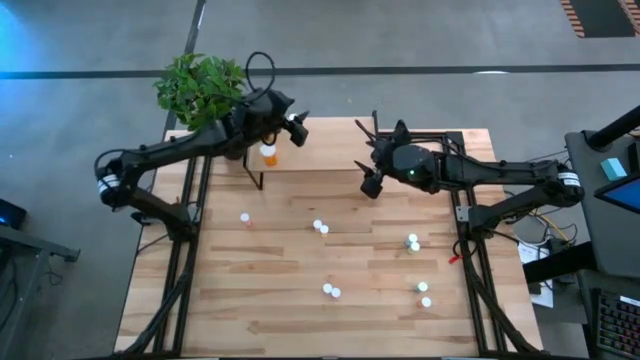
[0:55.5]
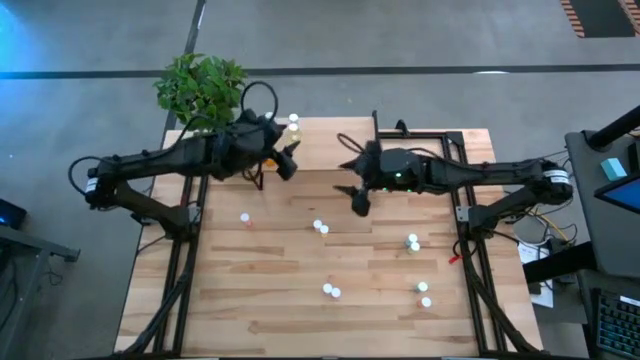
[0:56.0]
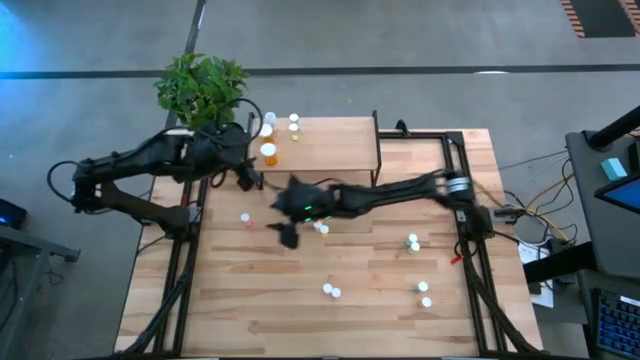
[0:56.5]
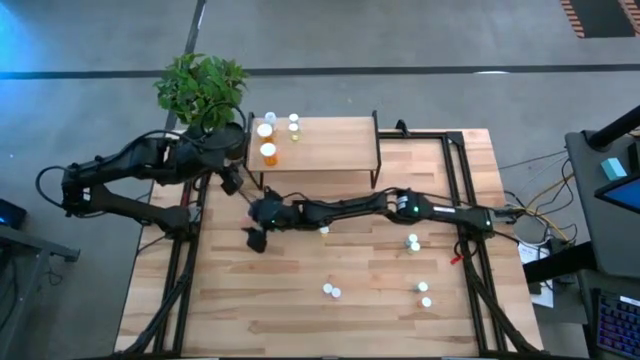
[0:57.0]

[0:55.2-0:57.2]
Task: Pick and place medicine bottles onto shelf by color
Put the pink pill bottle on the shelf

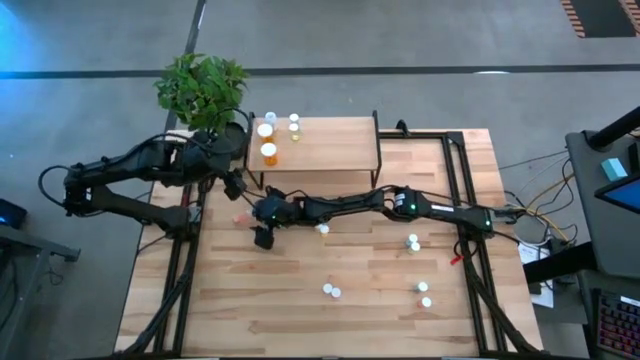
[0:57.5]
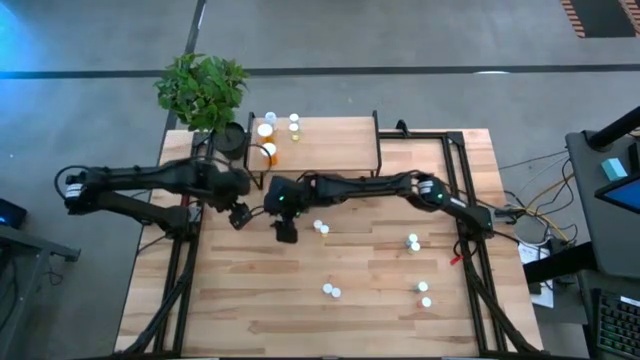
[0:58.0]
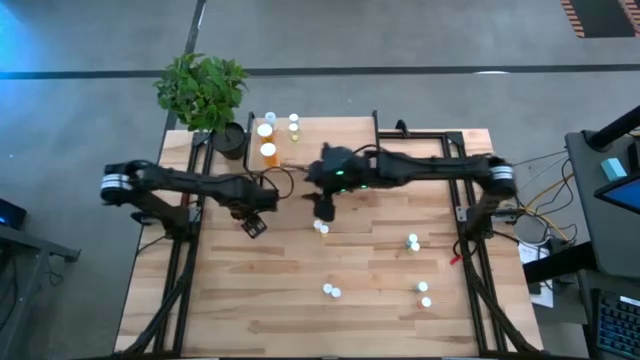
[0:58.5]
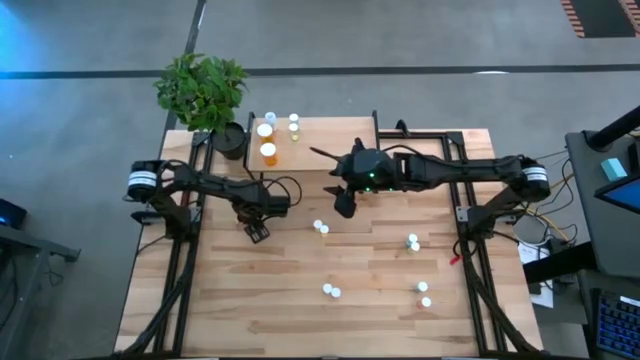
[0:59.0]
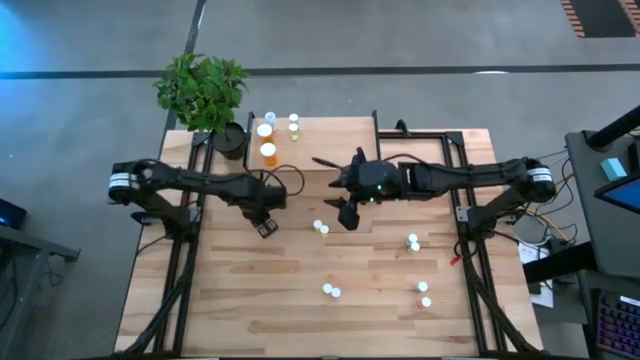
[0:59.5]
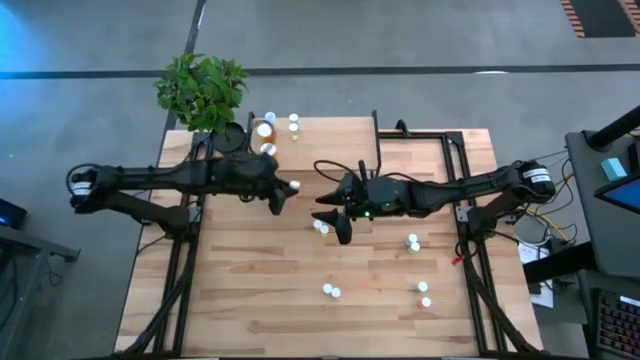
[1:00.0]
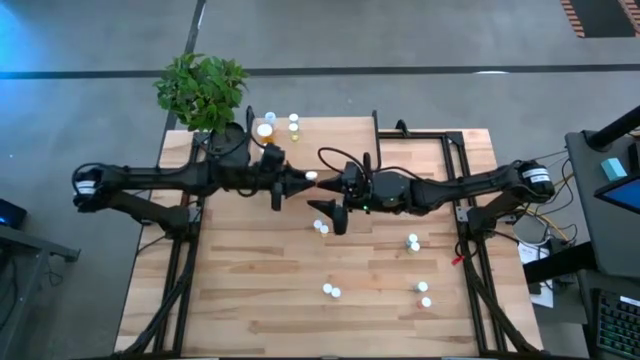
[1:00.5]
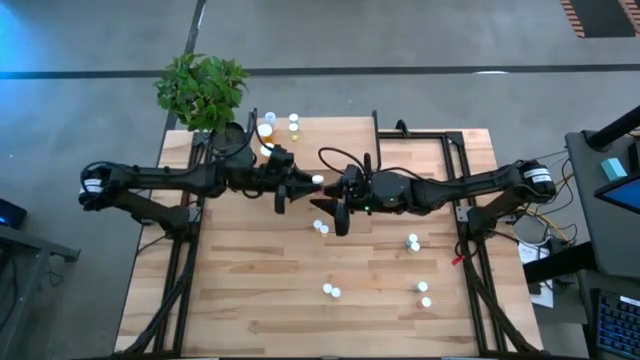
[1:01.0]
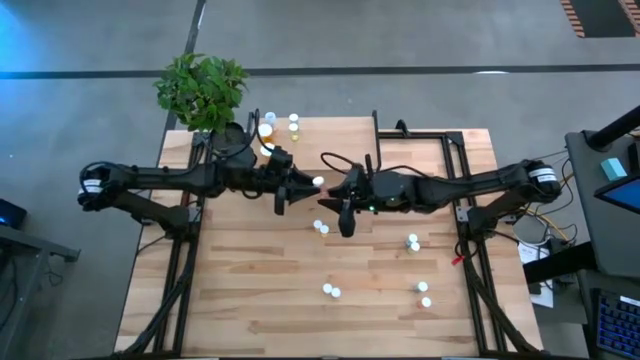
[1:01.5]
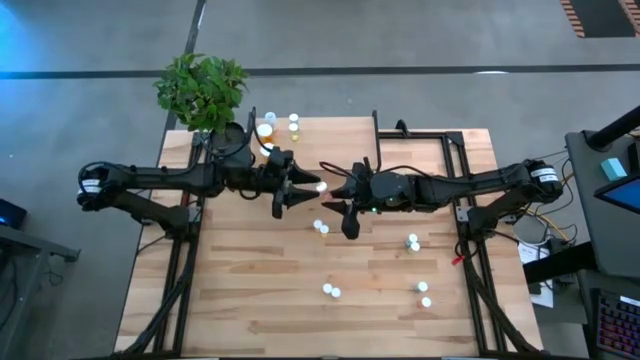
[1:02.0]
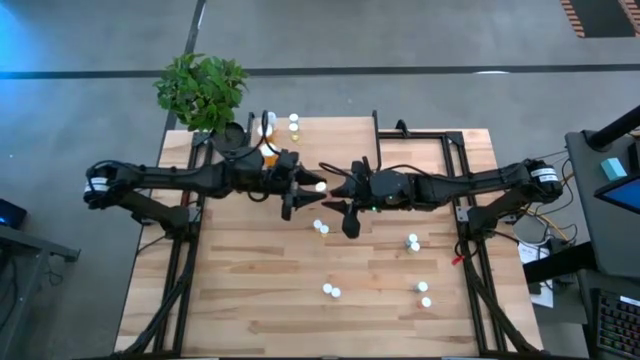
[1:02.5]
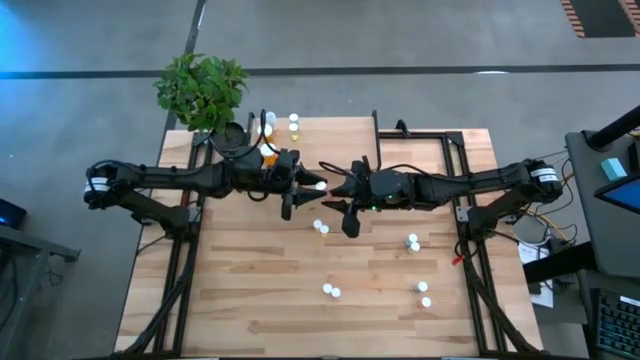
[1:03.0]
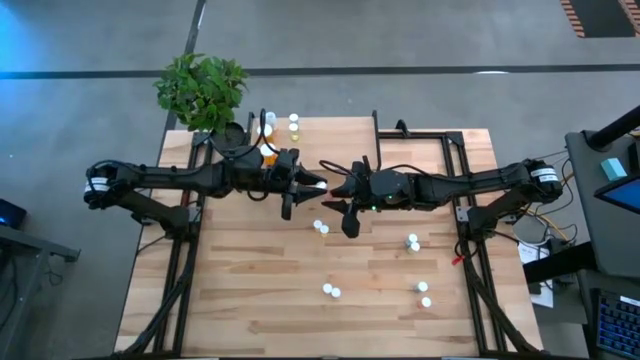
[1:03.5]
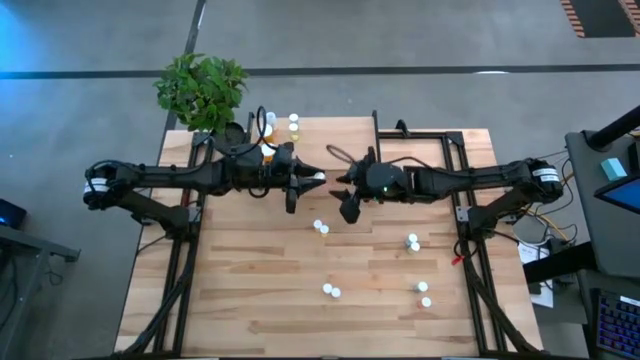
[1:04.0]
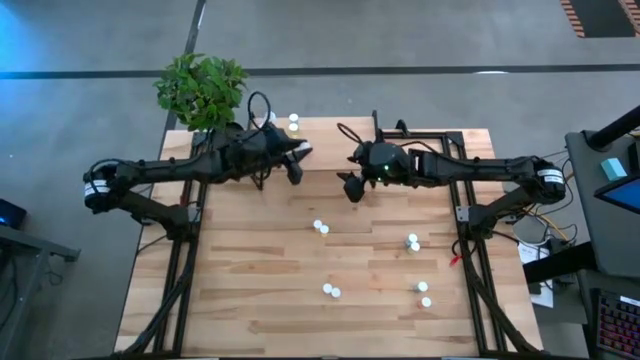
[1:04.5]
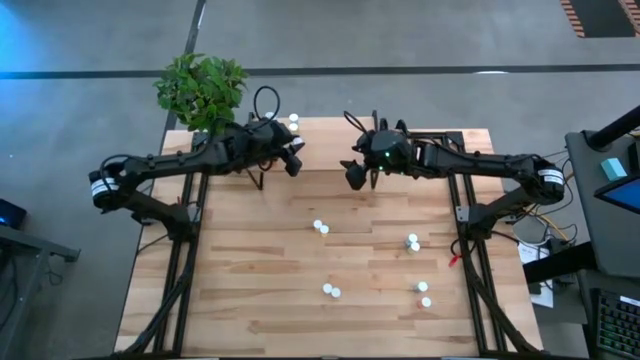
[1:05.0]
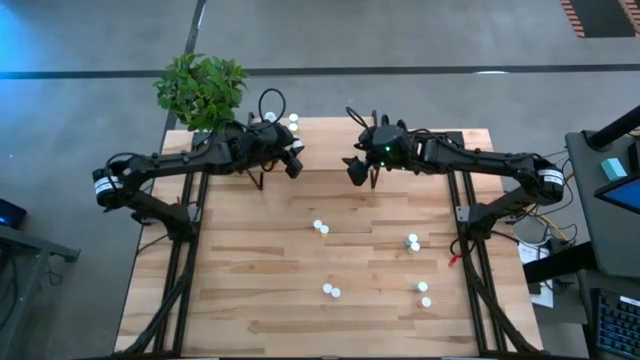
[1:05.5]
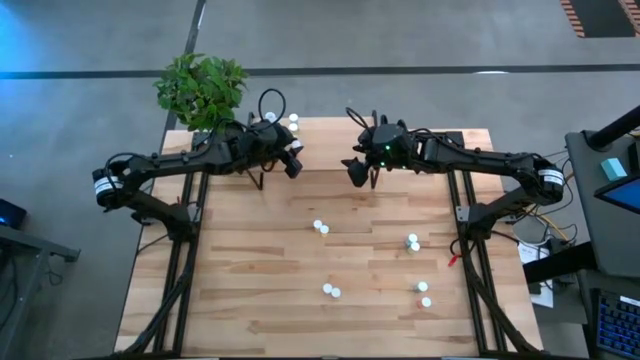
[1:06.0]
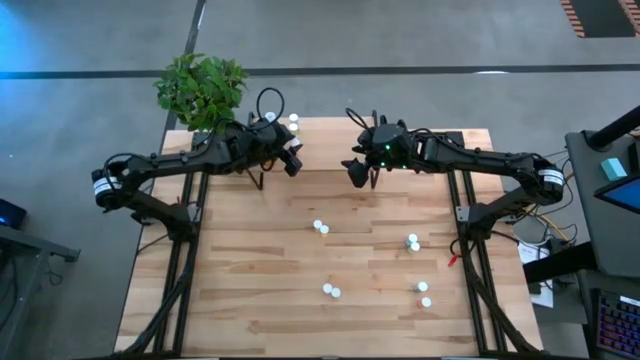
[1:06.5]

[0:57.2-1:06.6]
Put the pink pill bottle on the shelf

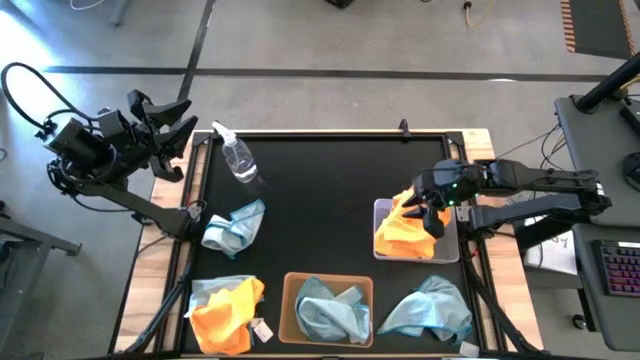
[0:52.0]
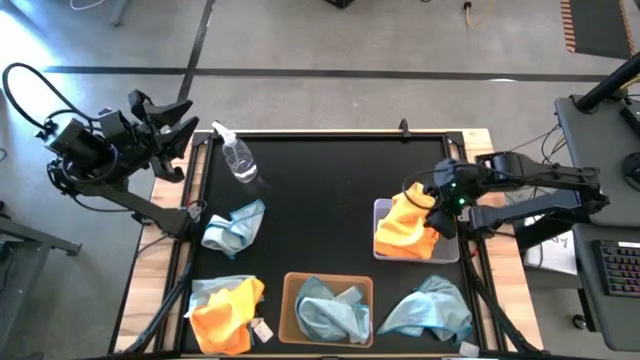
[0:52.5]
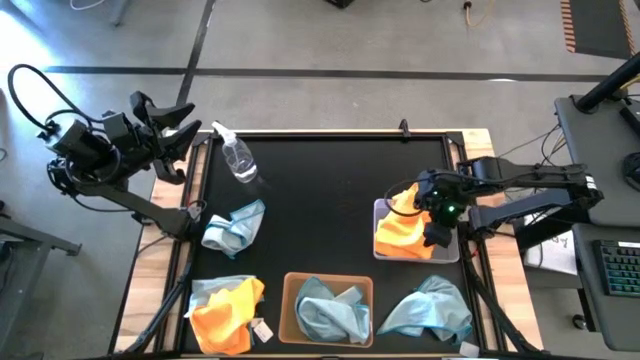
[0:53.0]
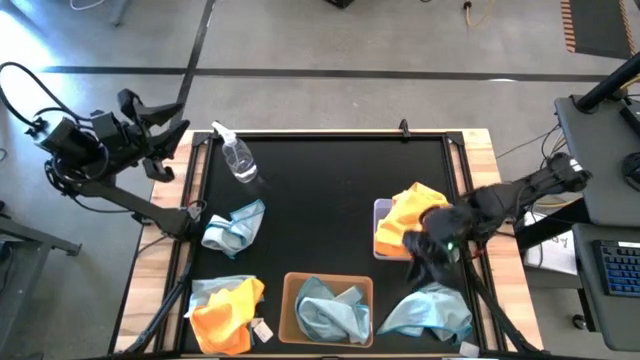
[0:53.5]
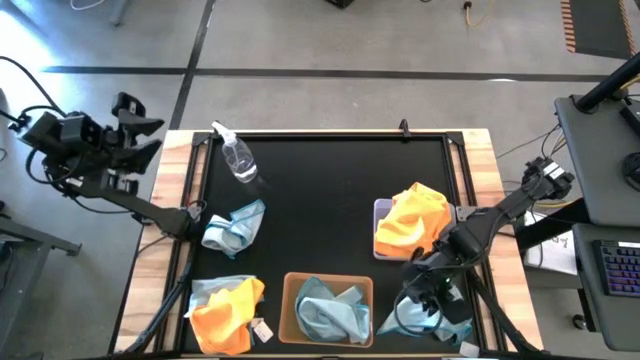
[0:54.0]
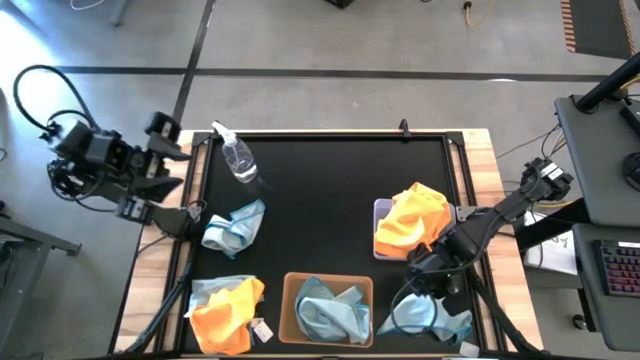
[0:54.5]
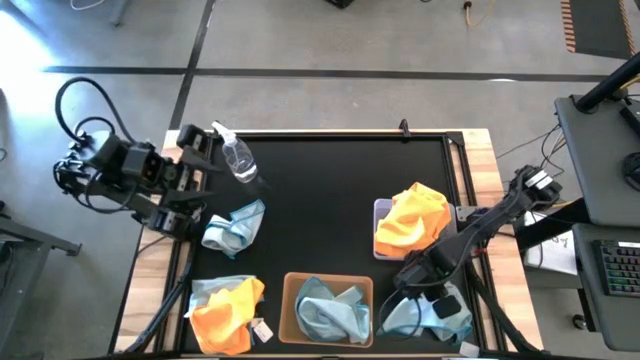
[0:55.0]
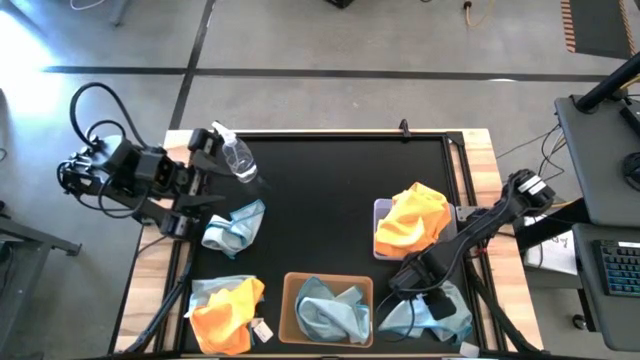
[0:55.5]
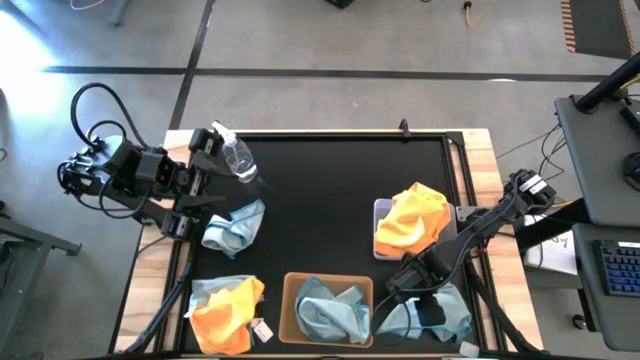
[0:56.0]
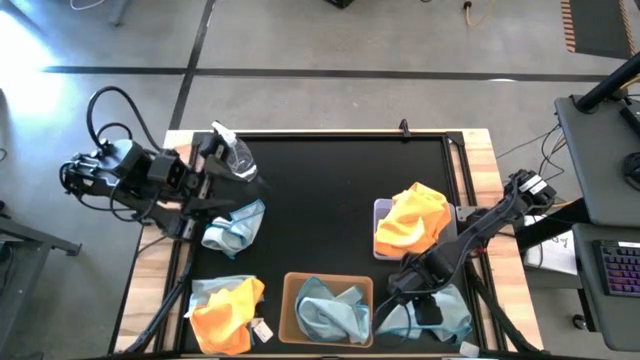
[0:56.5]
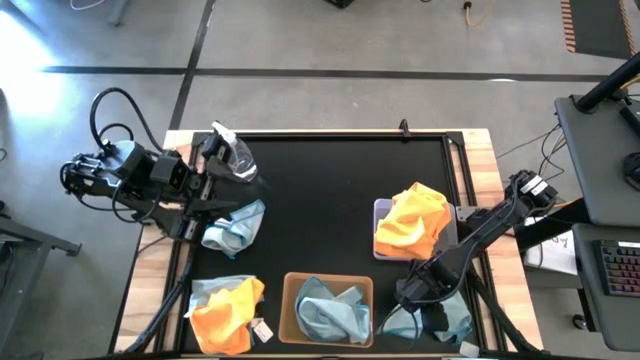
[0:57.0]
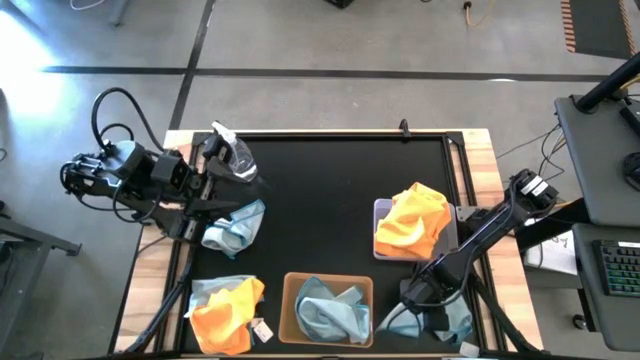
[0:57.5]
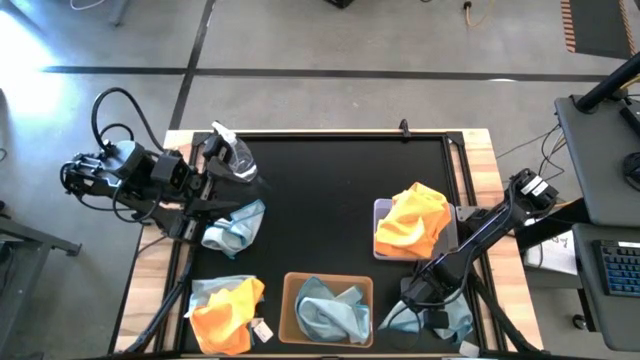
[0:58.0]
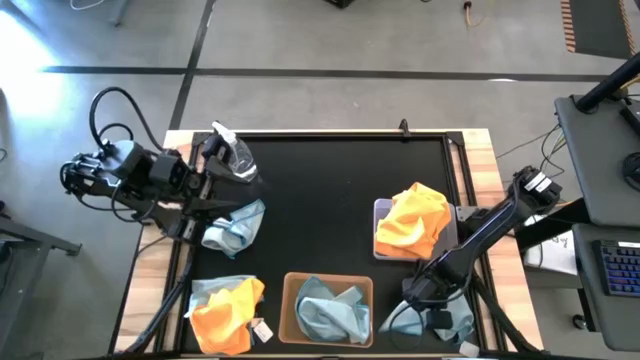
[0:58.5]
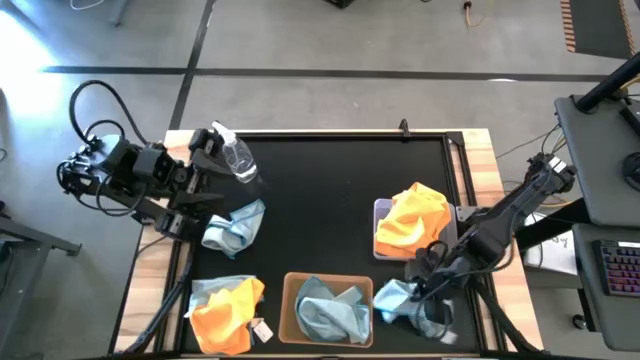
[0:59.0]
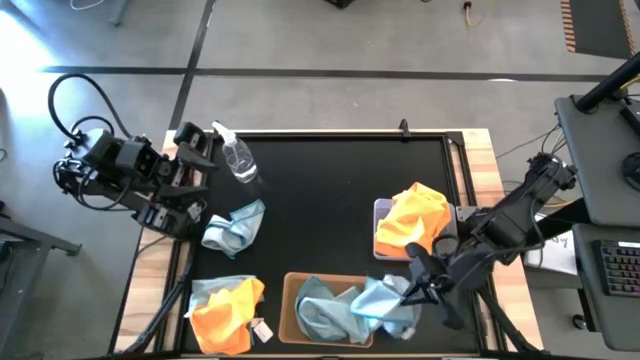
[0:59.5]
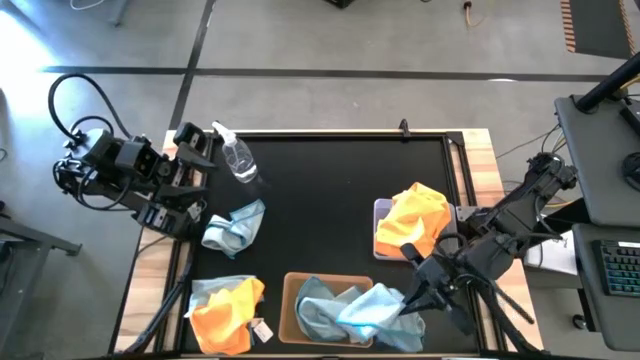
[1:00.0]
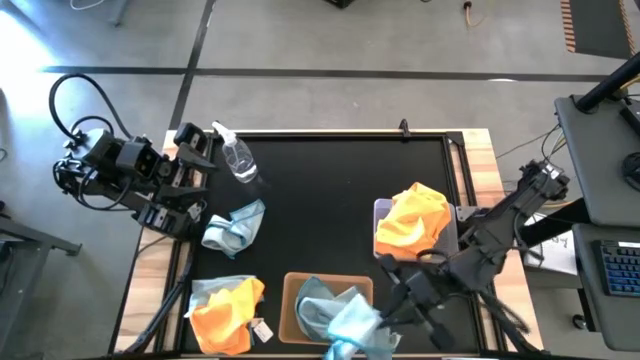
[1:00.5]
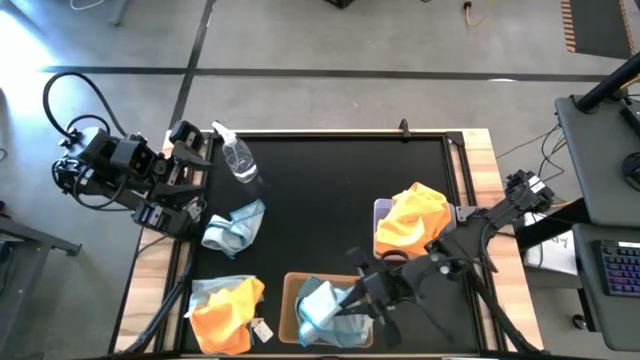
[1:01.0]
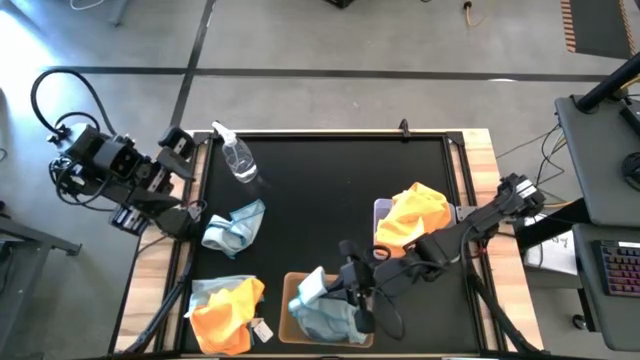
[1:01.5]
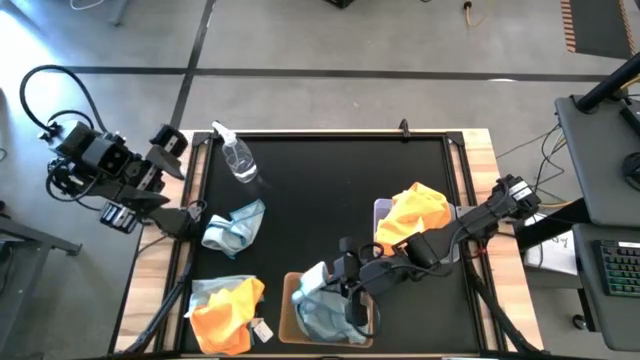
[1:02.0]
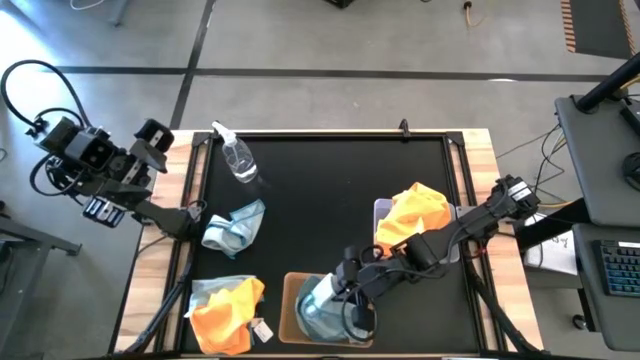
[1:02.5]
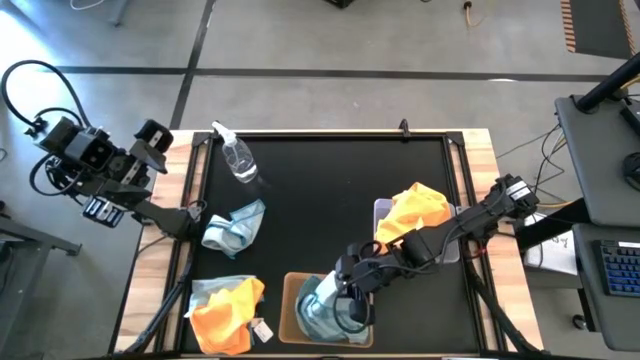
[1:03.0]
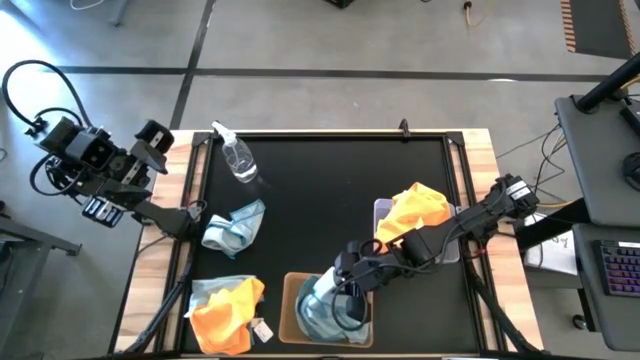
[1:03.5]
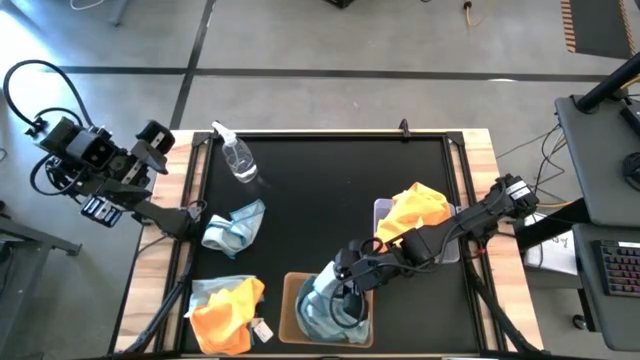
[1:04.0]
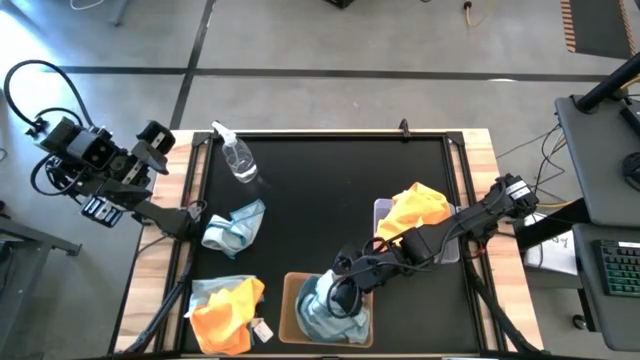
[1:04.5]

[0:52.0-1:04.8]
Task: Sort microfiber towel by color & place in baskets
Put the right blue microfiber towel into the orange bin
